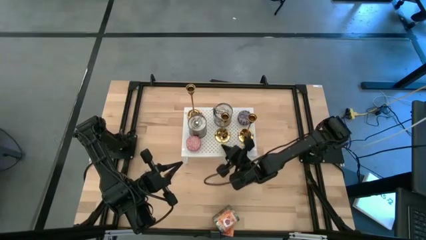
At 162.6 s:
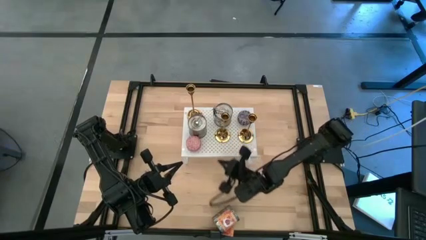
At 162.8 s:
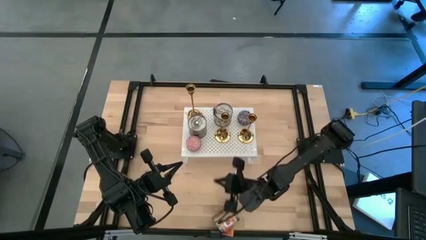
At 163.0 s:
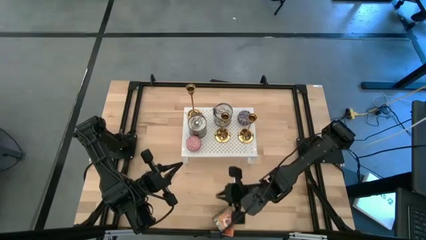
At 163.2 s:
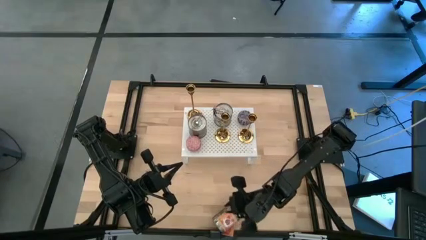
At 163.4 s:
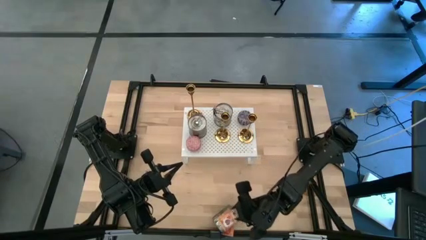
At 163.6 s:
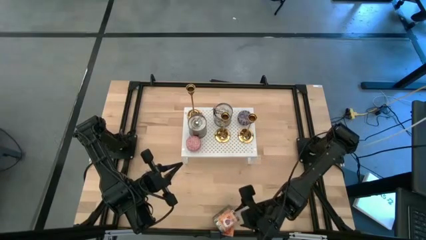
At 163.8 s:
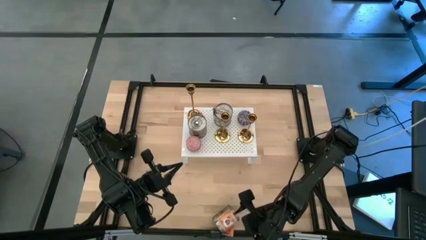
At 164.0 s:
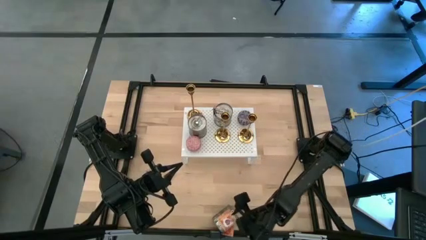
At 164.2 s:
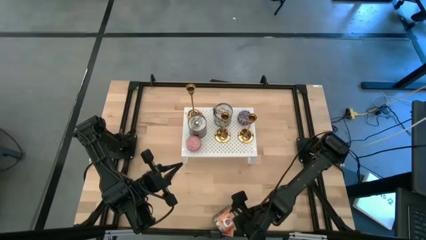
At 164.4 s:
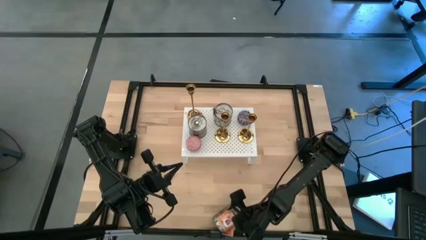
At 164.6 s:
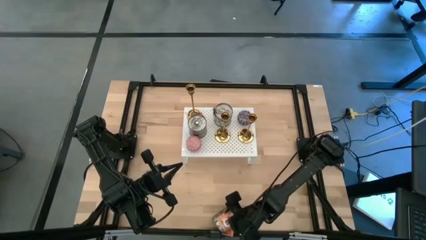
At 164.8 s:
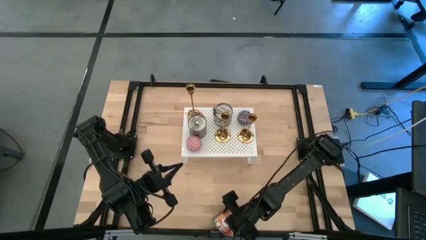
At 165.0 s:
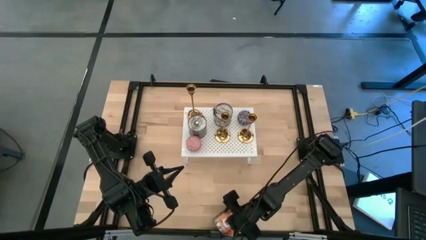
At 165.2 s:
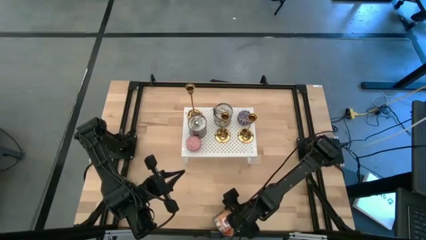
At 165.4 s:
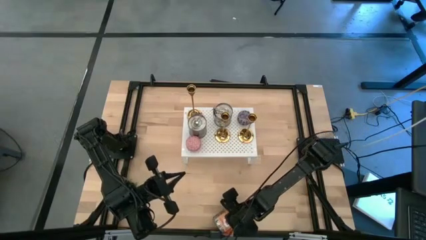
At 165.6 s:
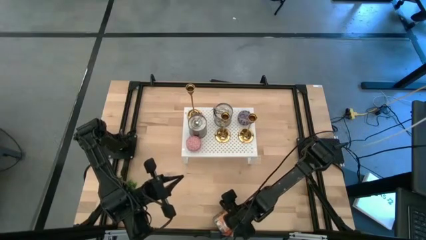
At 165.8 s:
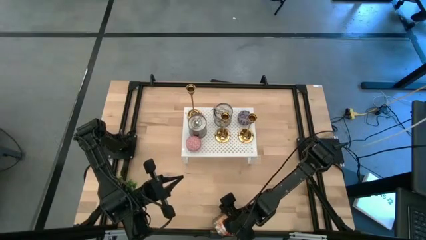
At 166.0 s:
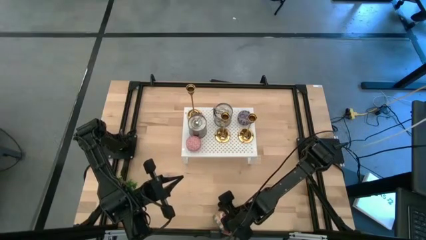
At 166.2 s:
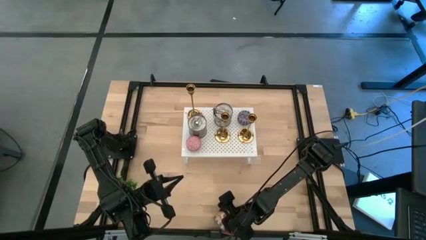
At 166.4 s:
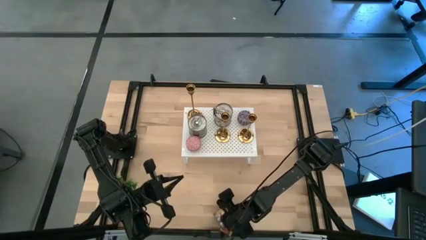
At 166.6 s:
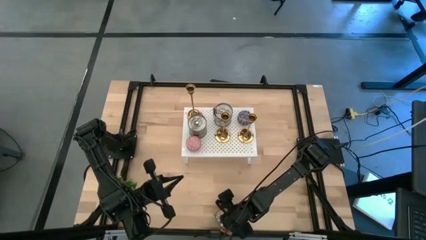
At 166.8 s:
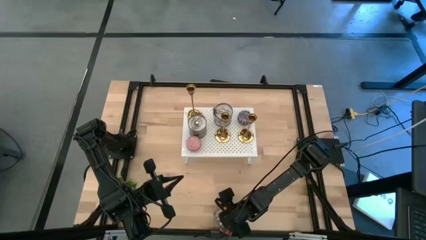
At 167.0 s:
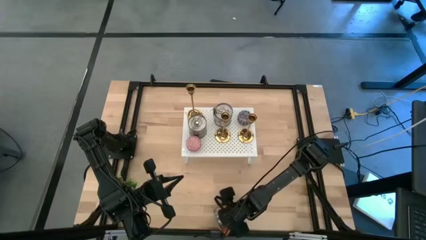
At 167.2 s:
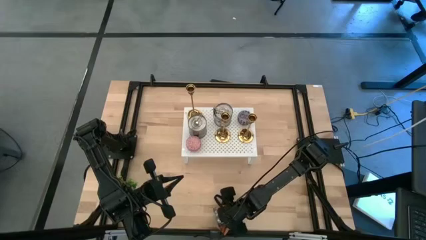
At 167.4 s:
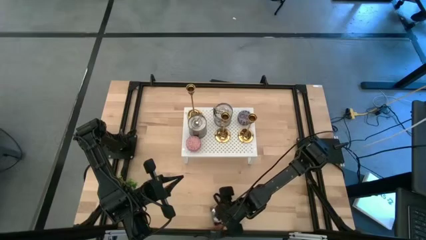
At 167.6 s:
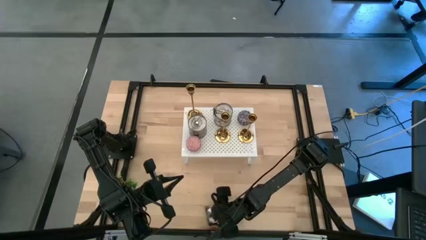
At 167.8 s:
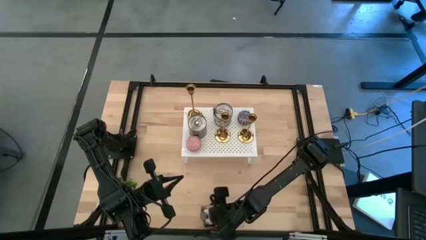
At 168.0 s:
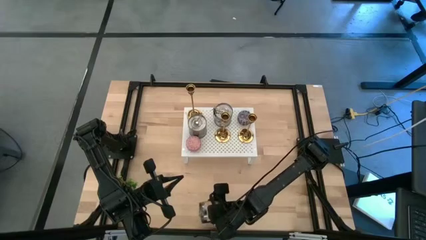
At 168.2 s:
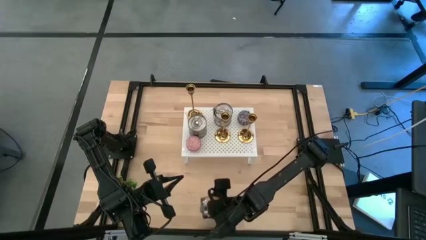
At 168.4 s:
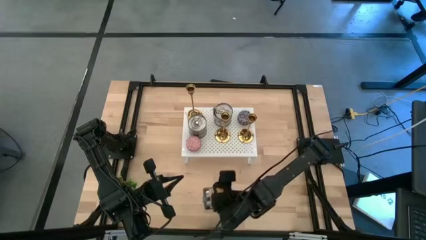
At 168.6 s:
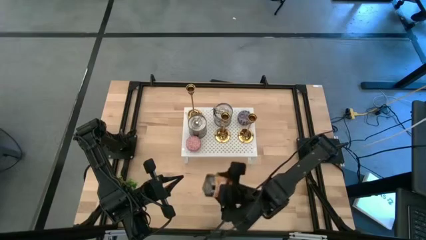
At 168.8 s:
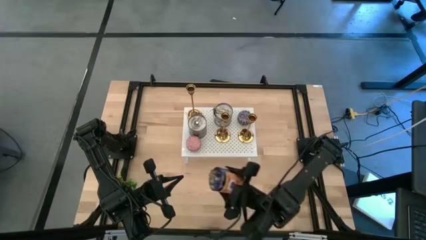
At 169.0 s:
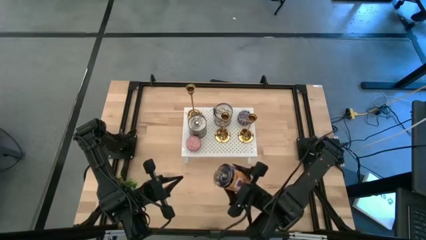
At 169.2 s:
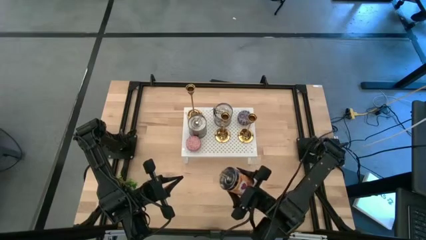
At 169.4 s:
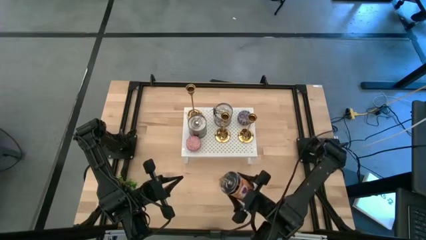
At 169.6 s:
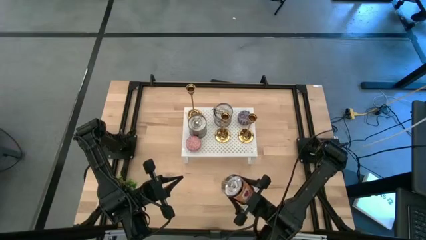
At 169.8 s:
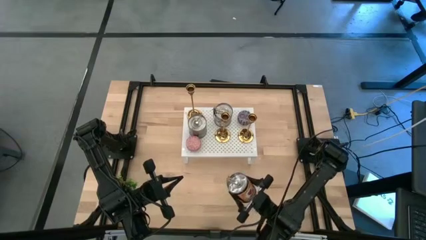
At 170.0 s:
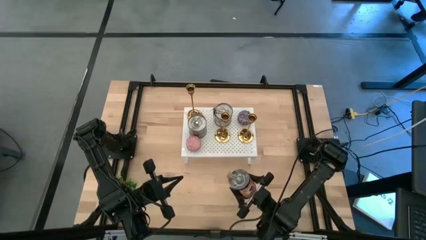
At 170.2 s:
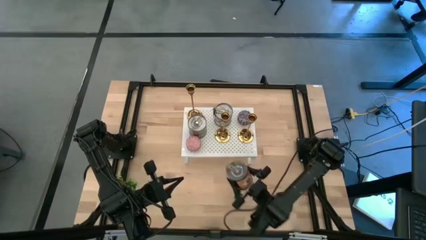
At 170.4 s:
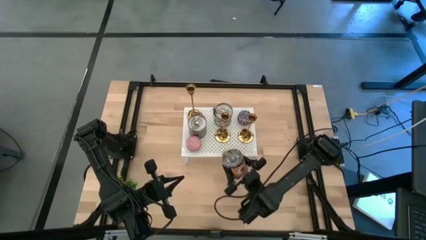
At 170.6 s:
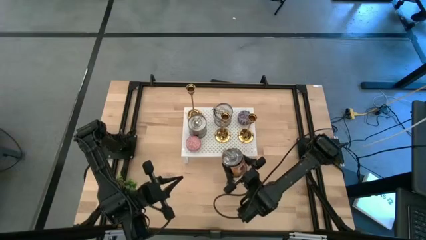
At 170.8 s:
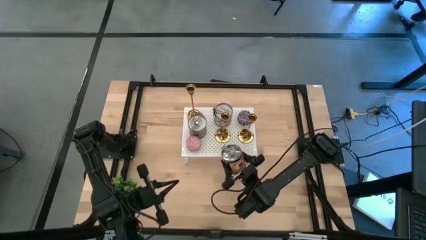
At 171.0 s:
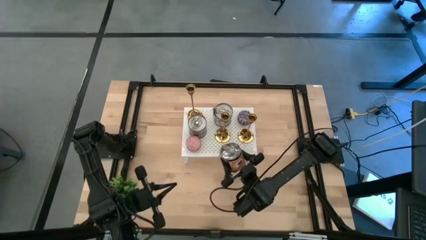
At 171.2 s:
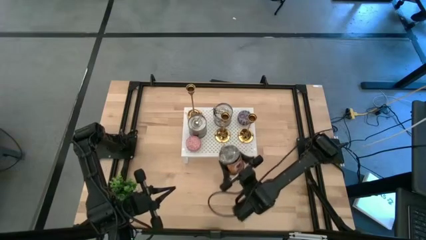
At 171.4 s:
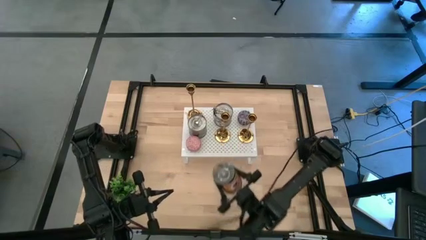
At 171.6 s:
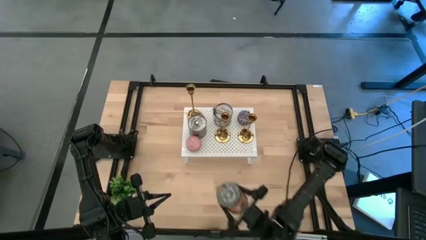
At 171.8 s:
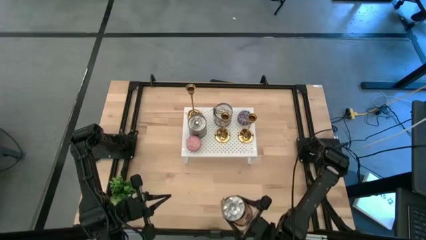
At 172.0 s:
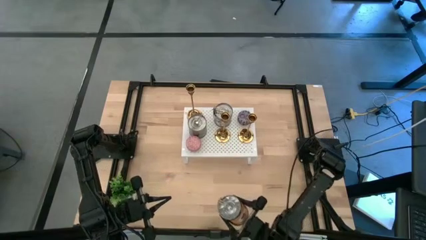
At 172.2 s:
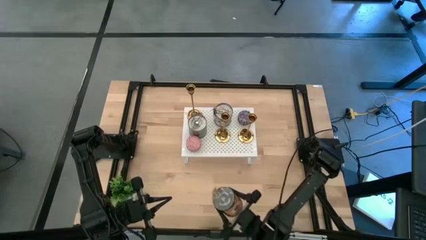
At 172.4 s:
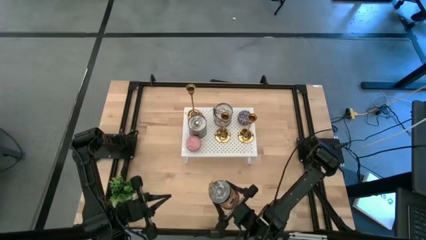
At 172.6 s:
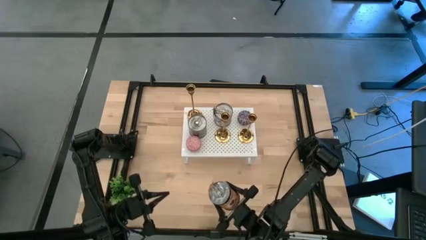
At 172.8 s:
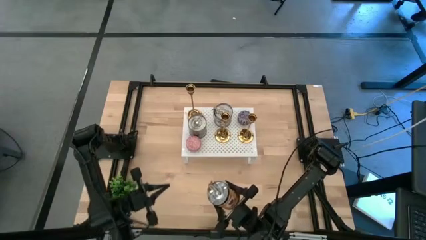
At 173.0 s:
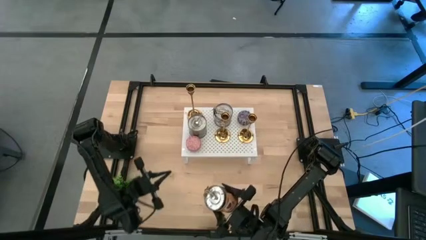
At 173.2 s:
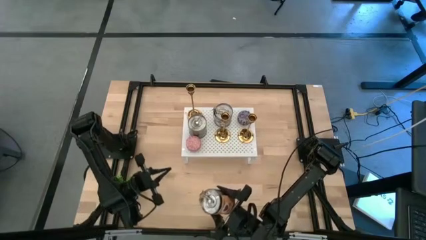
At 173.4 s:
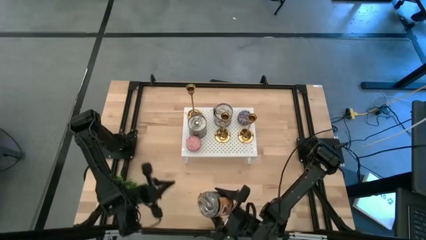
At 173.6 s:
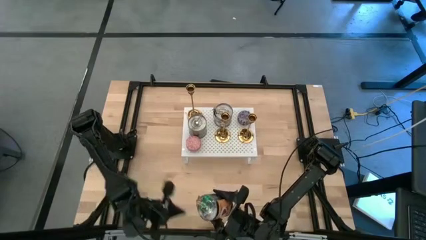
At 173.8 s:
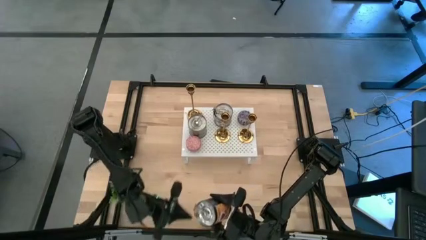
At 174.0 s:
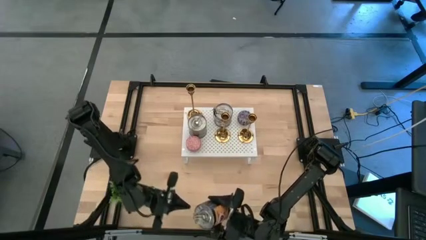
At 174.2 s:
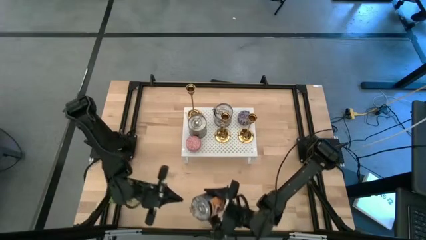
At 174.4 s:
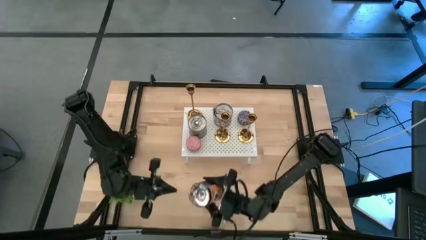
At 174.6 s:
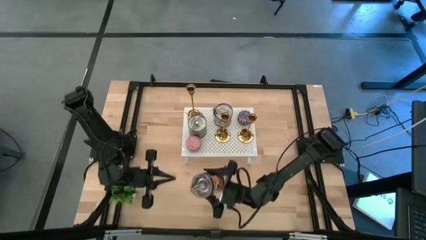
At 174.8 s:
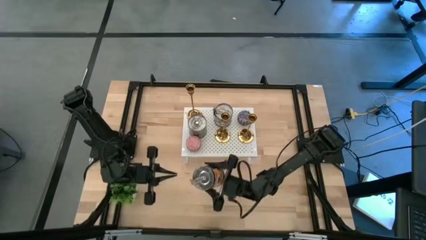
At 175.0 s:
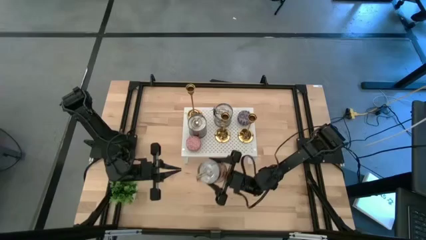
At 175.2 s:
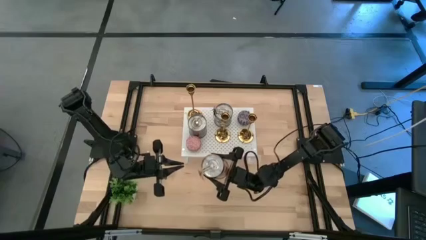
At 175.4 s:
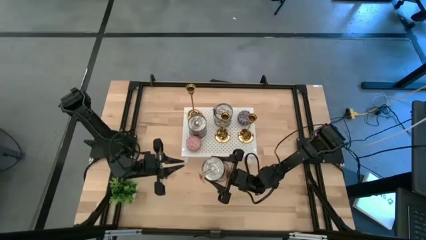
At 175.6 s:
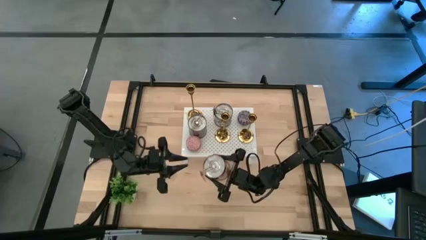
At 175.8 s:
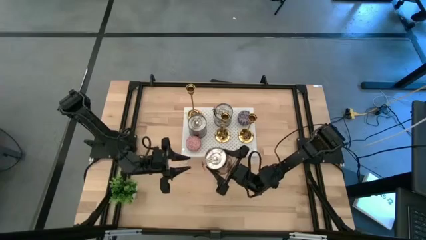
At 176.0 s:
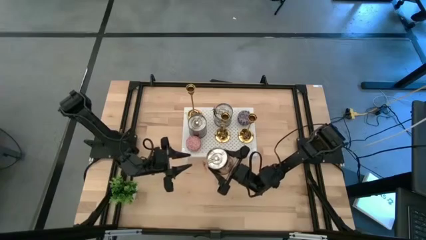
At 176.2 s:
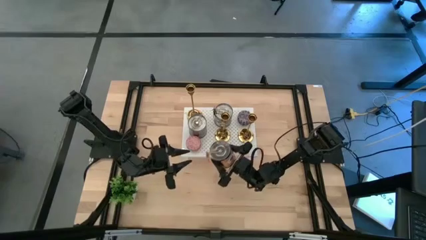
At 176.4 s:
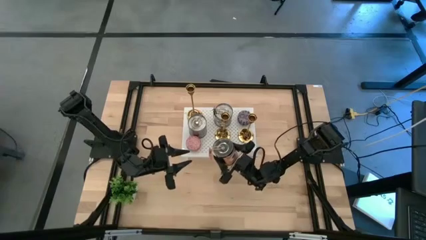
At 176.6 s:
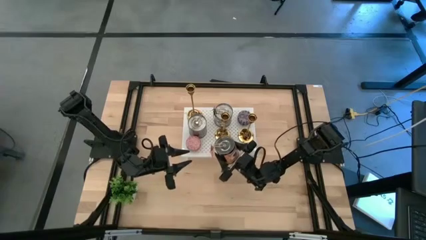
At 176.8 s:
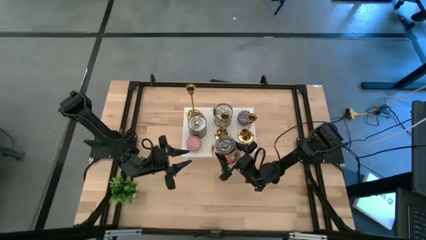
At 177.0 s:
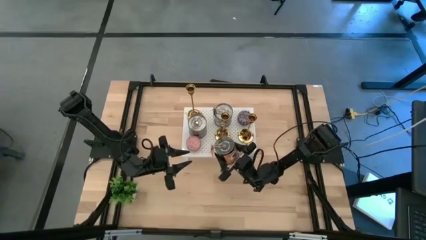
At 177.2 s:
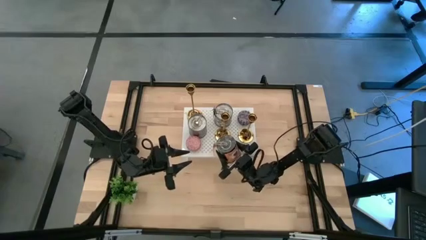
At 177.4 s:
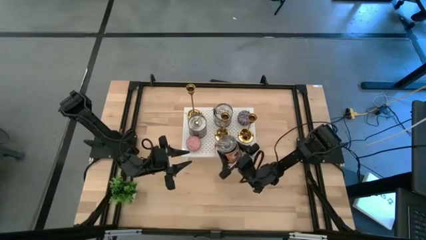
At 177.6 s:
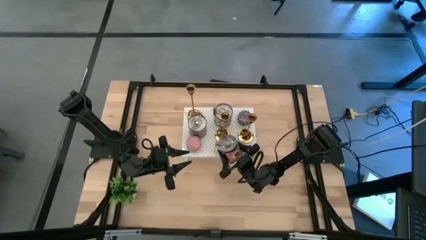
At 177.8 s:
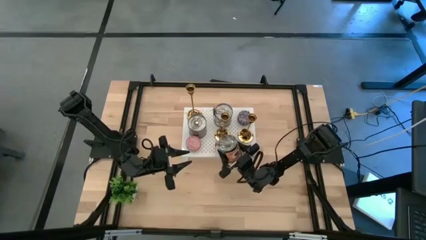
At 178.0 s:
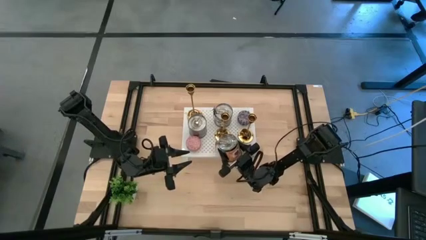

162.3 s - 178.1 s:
Task: Pick & Place candle stick holders
Put the big silver scented candle on the shelf
